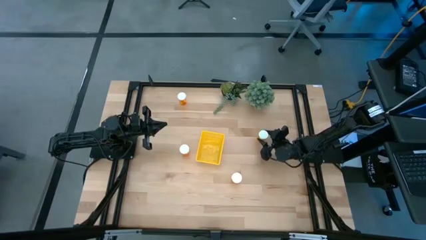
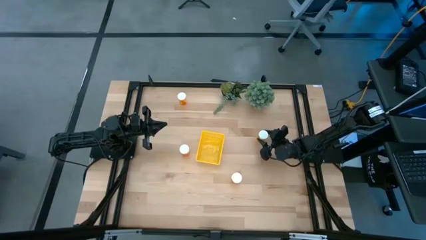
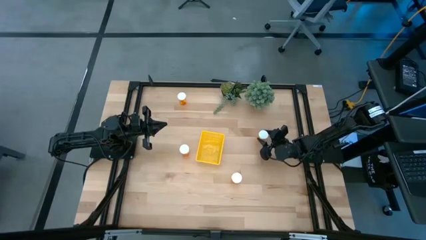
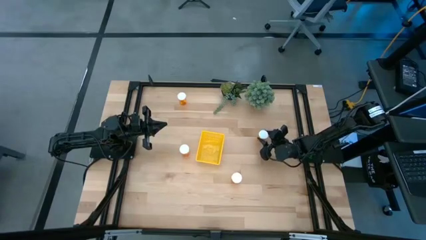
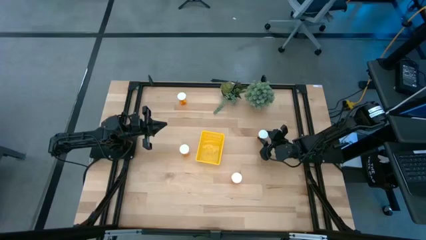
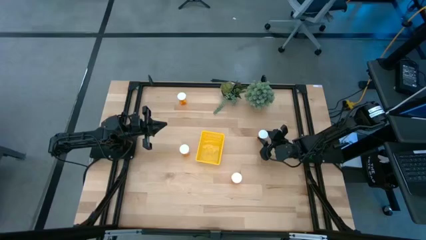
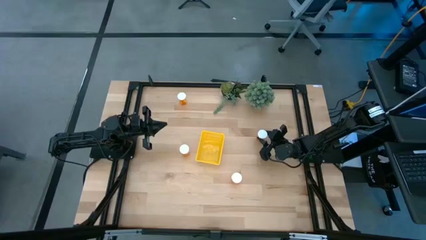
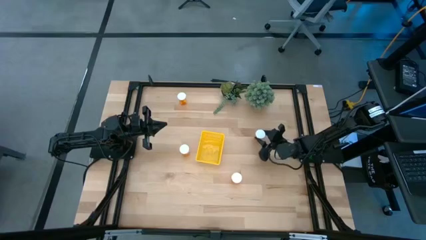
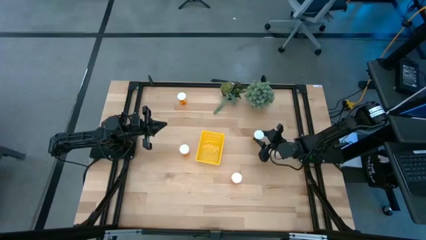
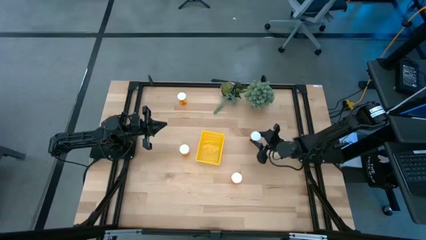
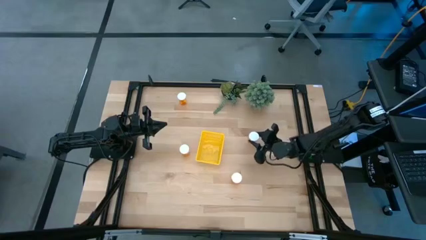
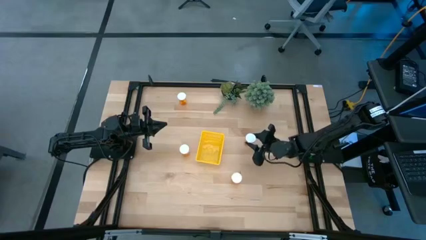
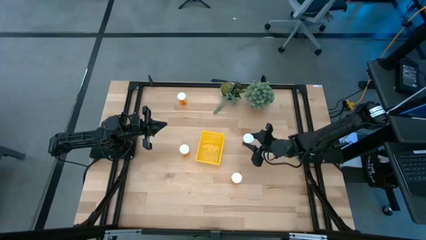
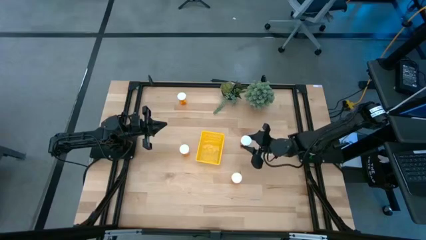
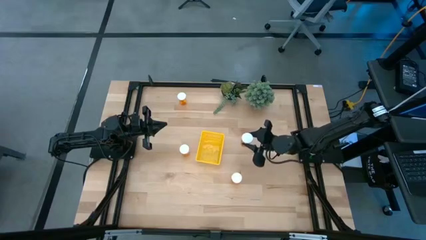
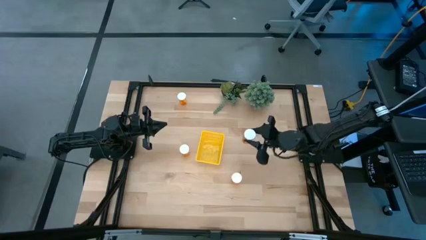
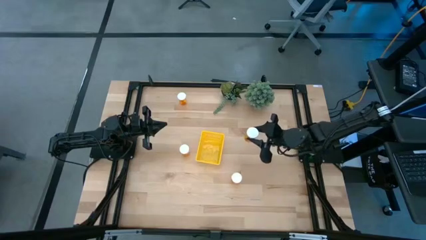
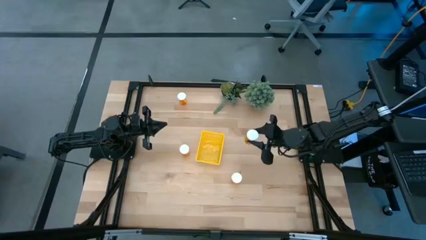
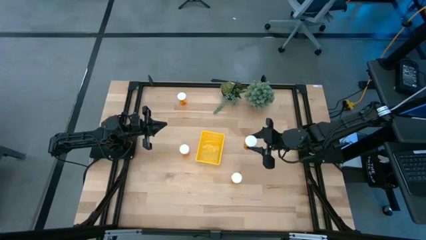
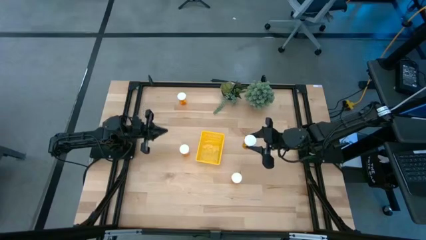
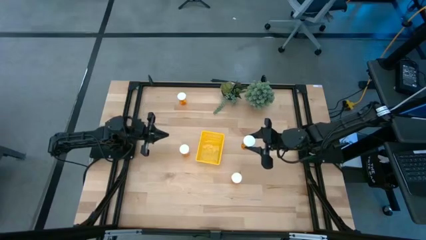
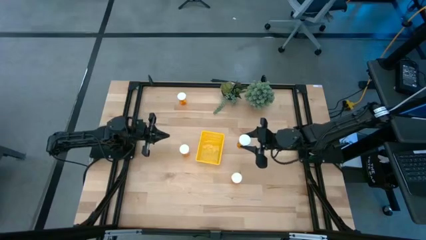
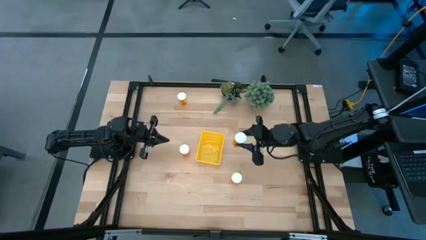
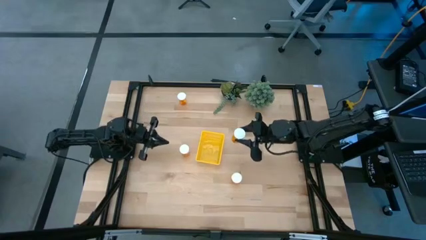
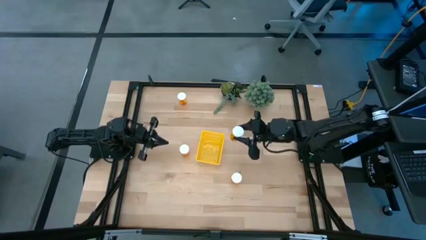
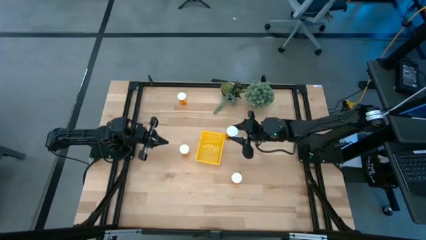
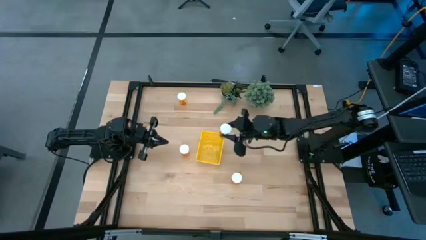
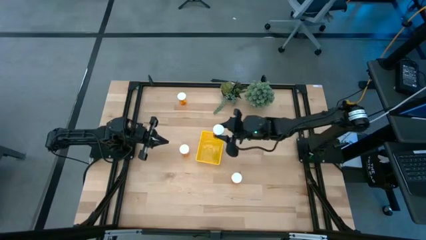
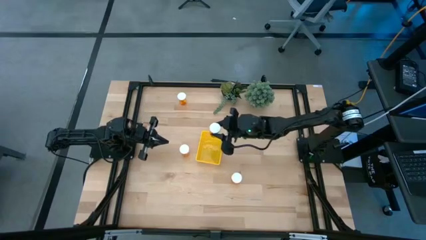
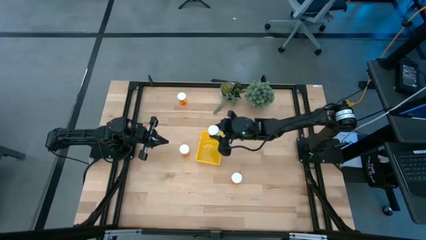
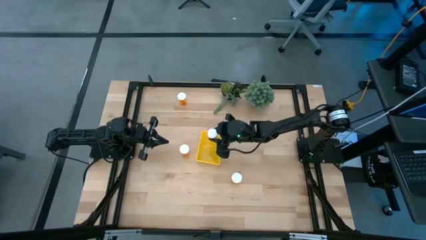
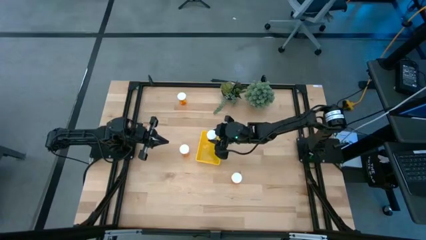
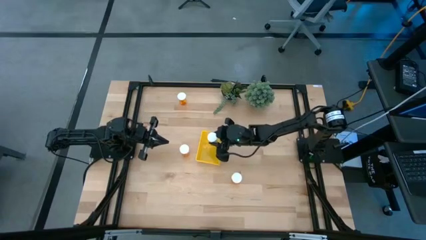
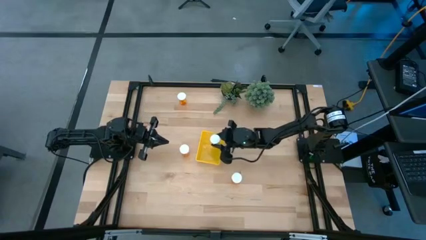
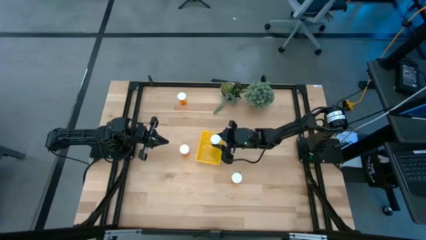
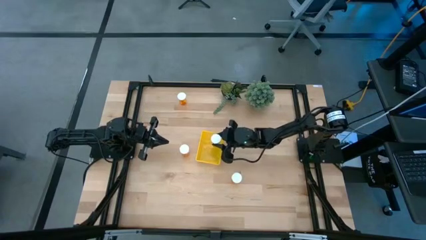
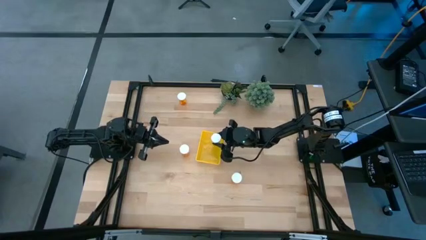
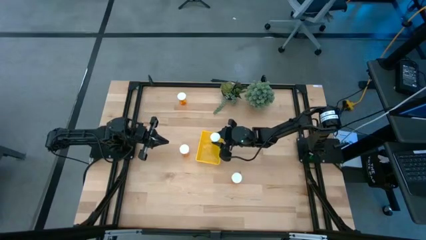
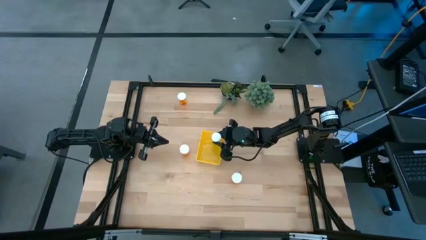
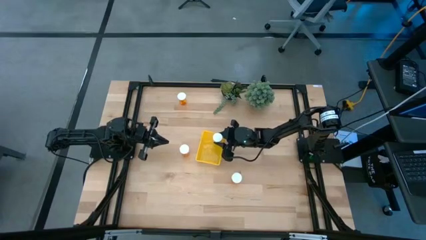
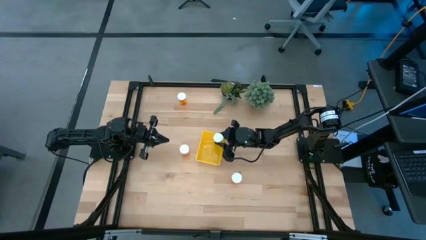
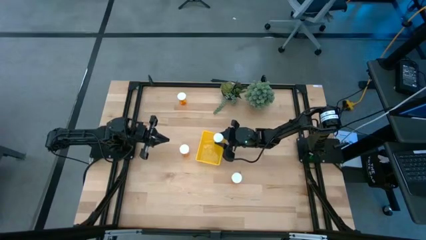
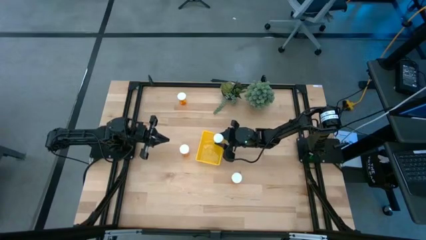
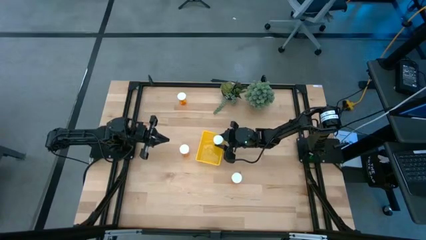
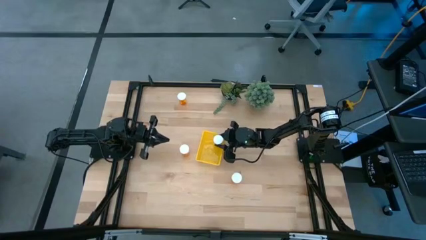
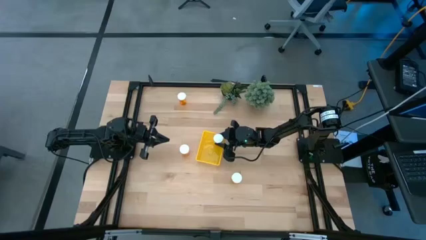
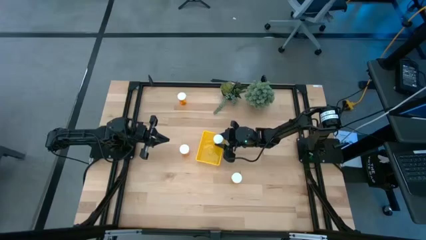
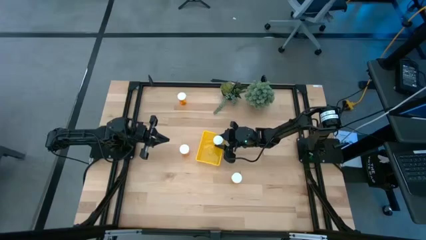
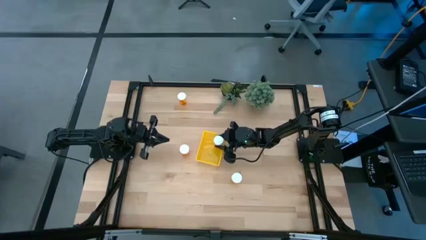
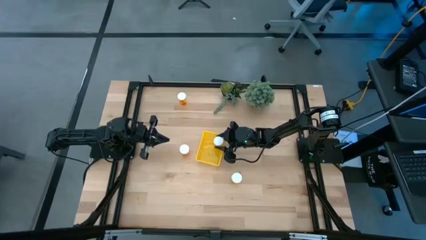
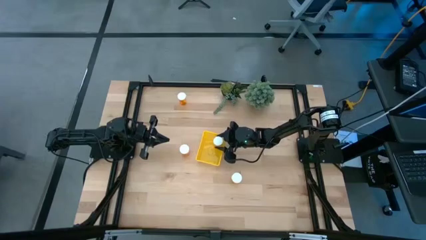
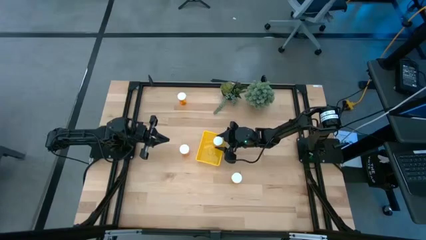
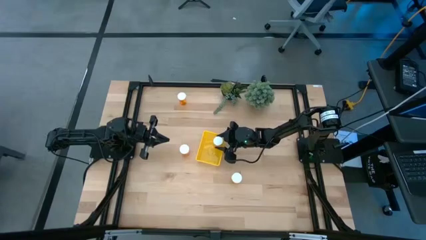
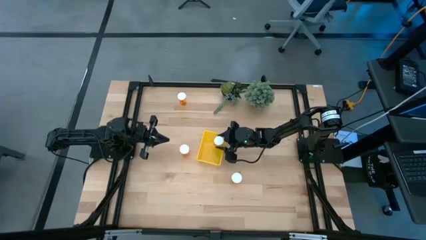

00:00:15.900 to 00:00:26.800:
Task: Pick and place pill bottles into a basket
Put the orange pill bottle into the yellow bin

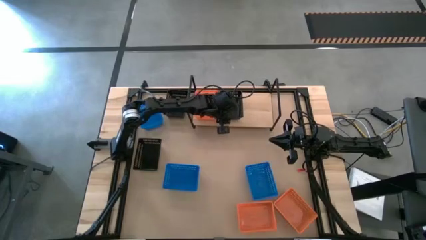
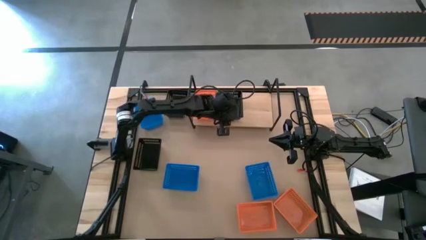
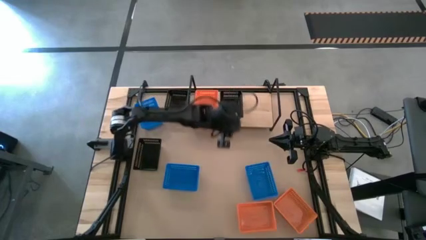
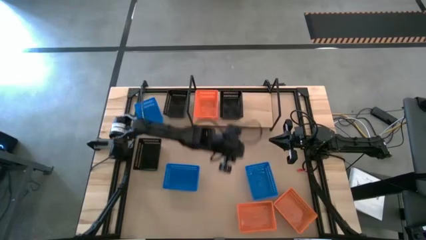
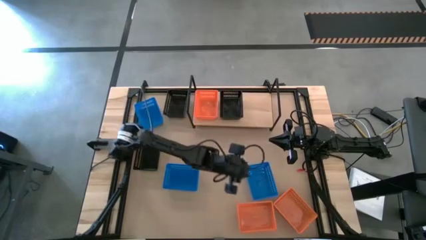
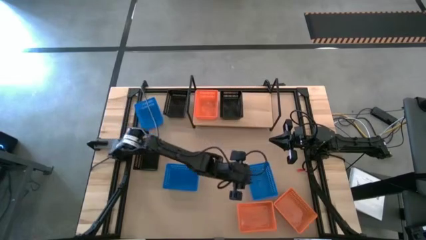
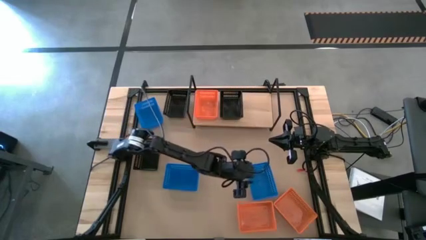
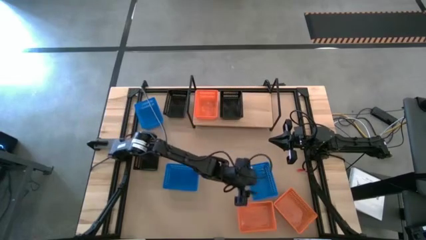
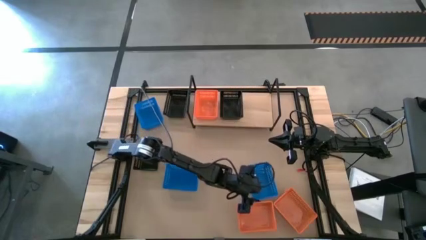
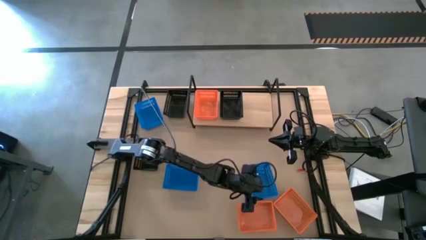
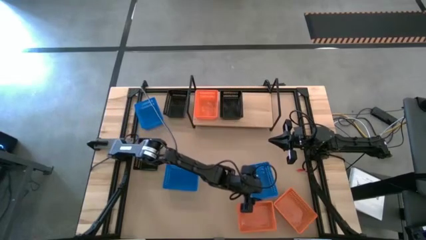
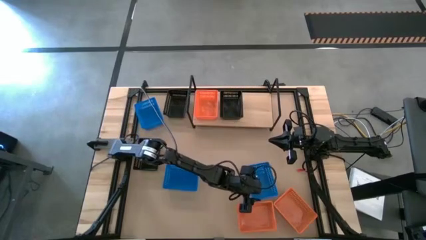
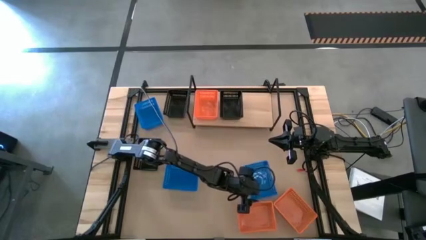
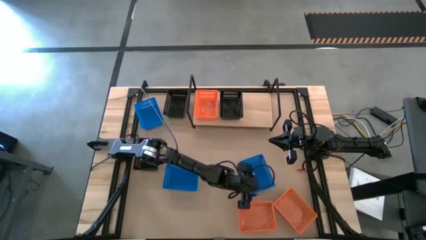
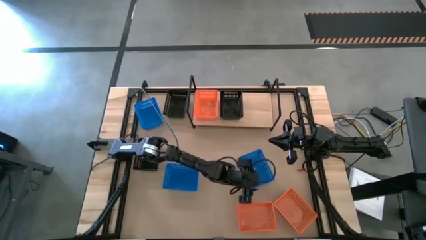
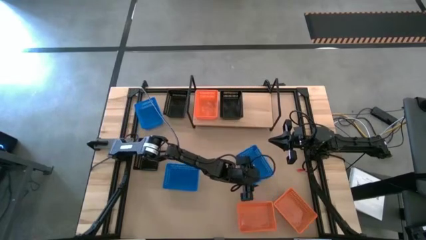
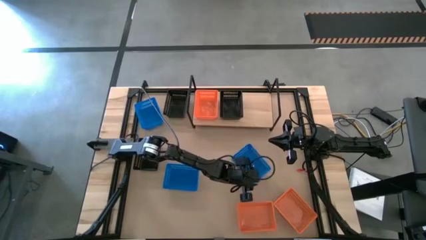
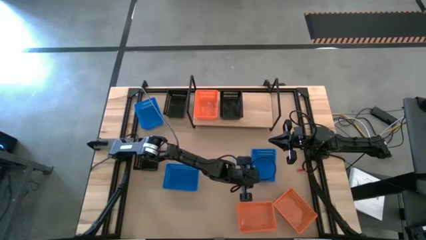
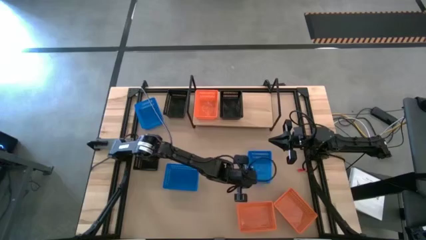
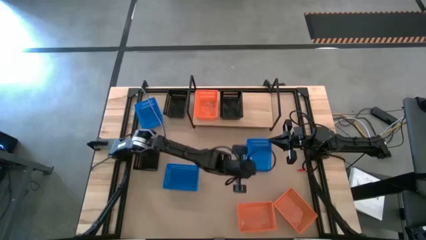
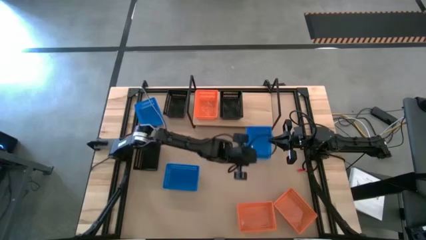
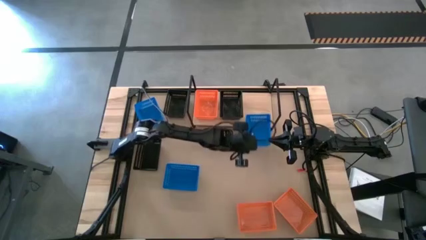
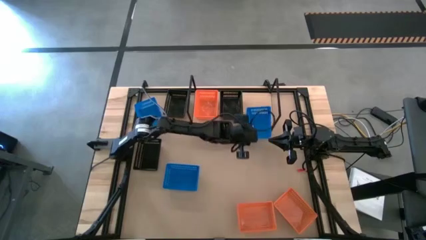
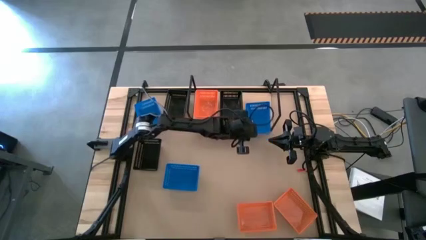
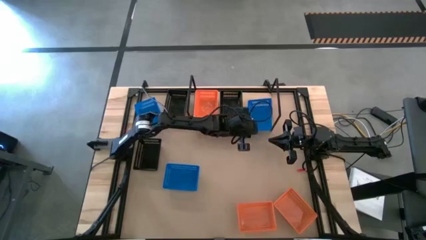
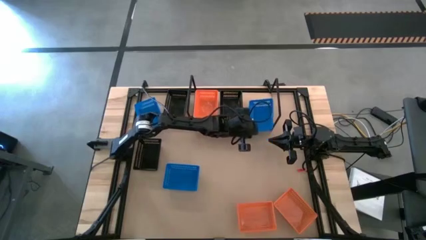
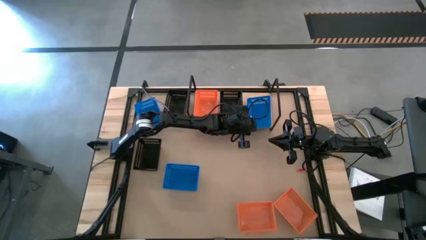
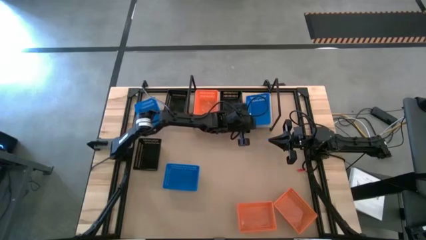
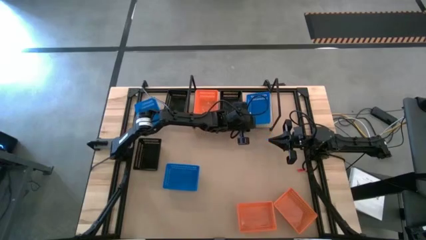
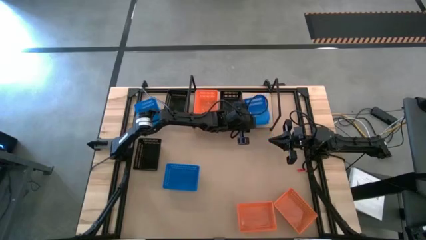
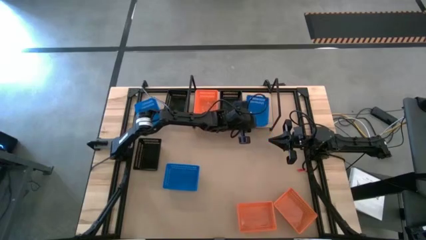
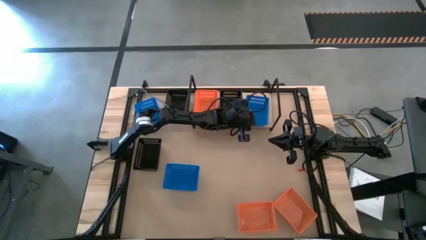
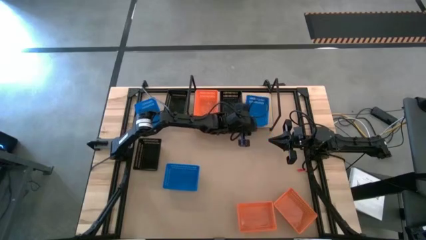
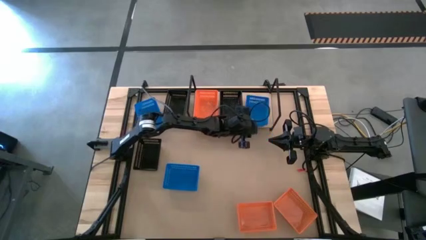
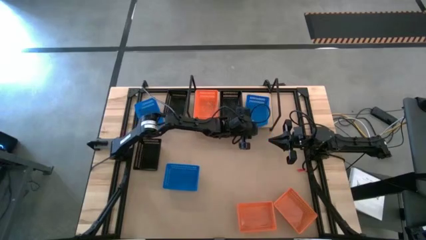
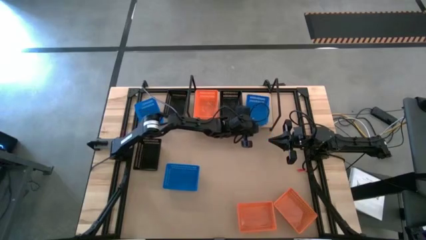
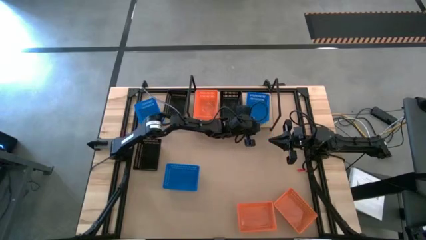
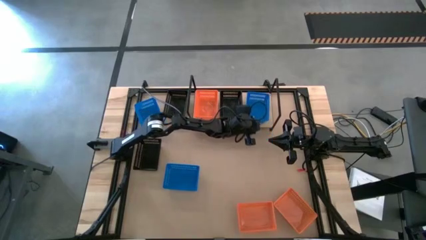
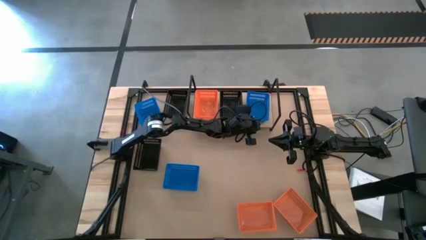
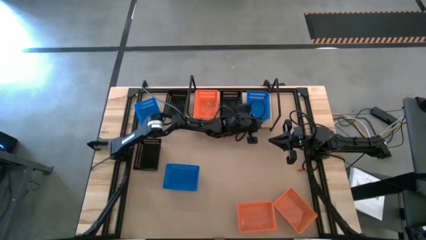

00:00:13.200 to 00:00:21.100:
Task: Stack baskets on shelf by color
Put the right blue bin on the shelf
